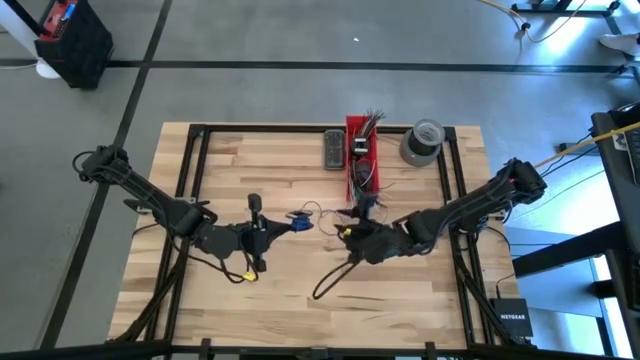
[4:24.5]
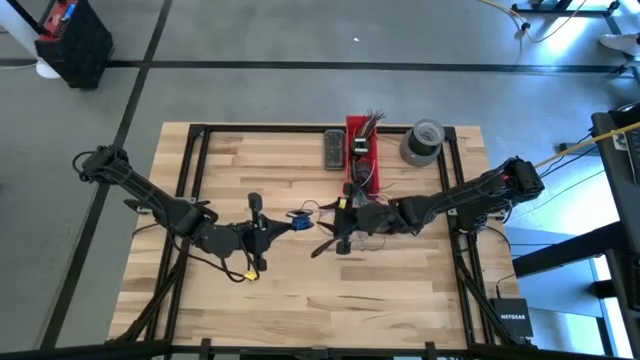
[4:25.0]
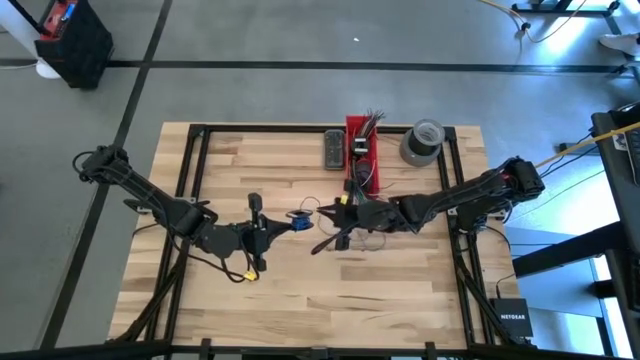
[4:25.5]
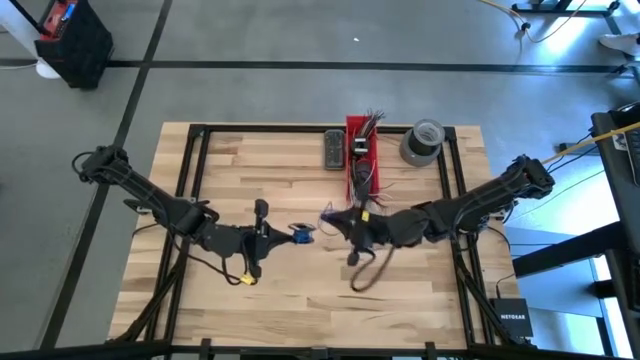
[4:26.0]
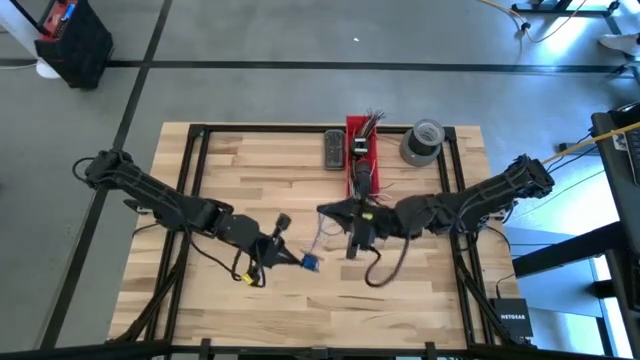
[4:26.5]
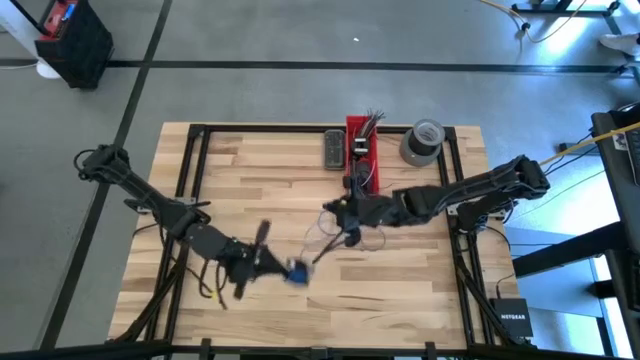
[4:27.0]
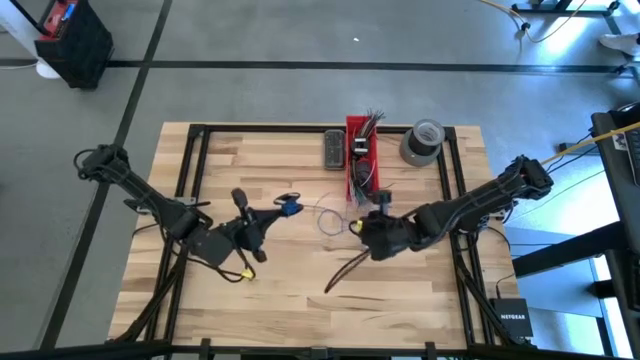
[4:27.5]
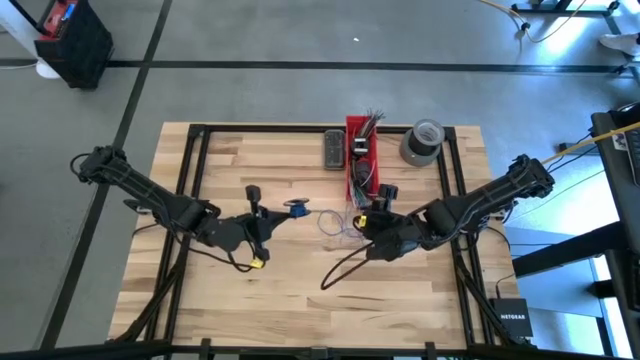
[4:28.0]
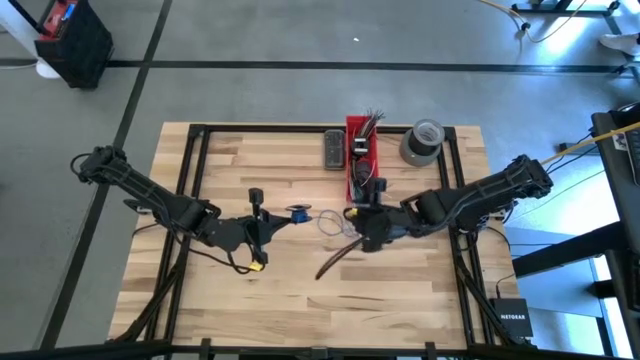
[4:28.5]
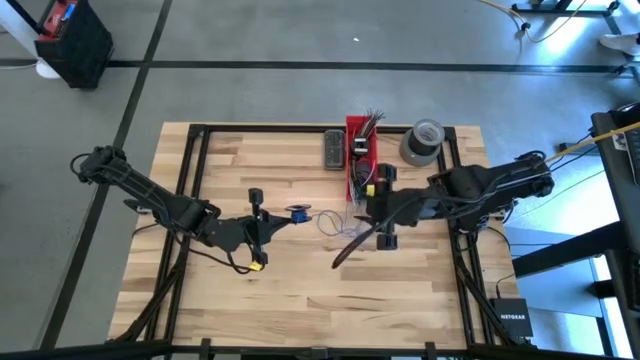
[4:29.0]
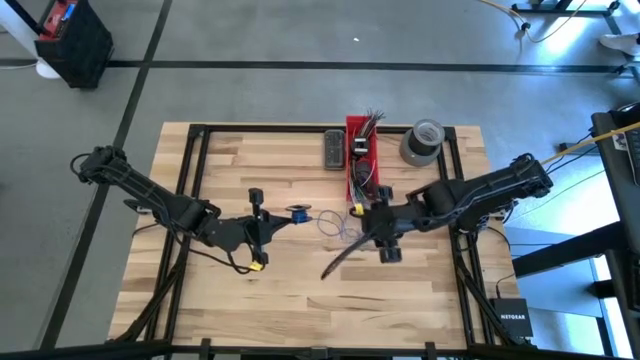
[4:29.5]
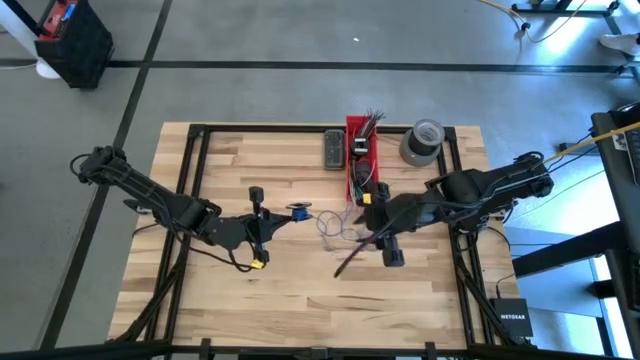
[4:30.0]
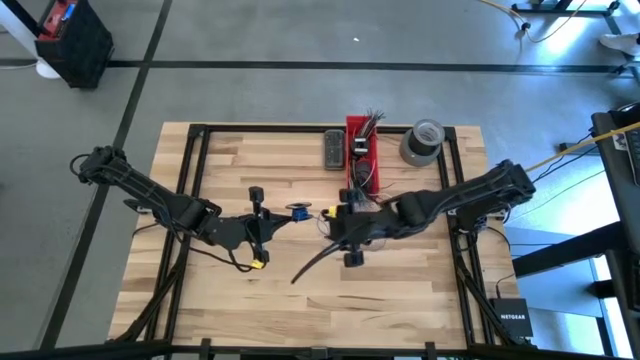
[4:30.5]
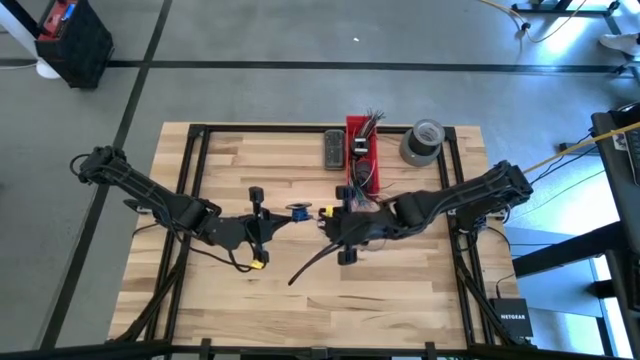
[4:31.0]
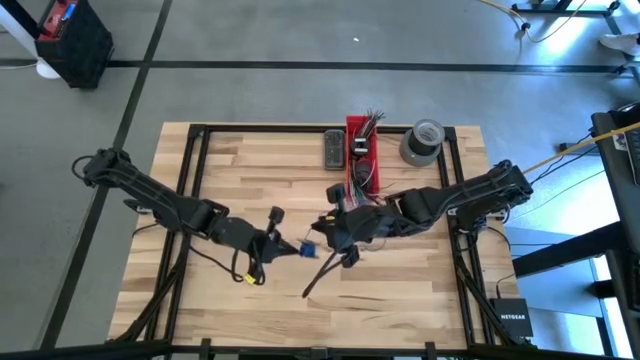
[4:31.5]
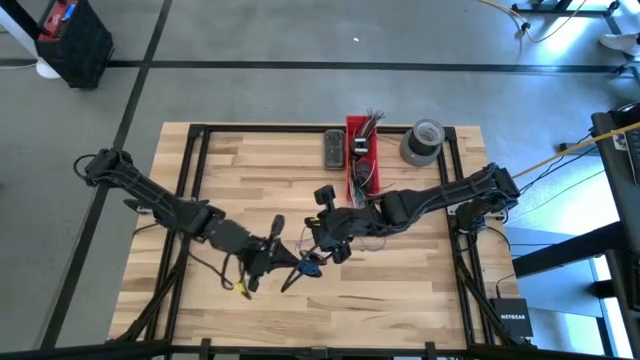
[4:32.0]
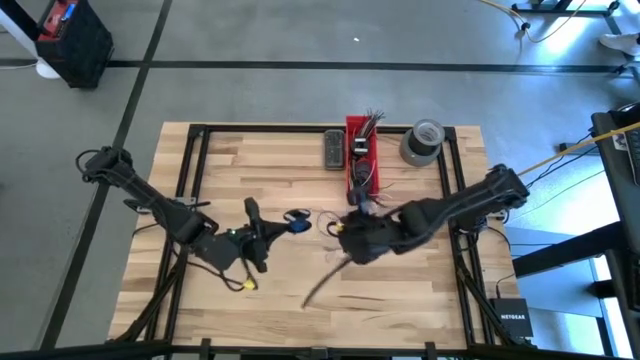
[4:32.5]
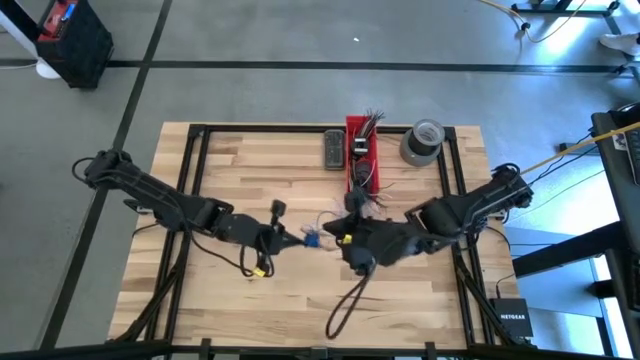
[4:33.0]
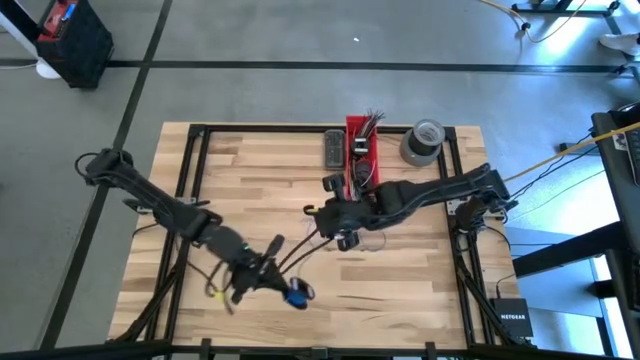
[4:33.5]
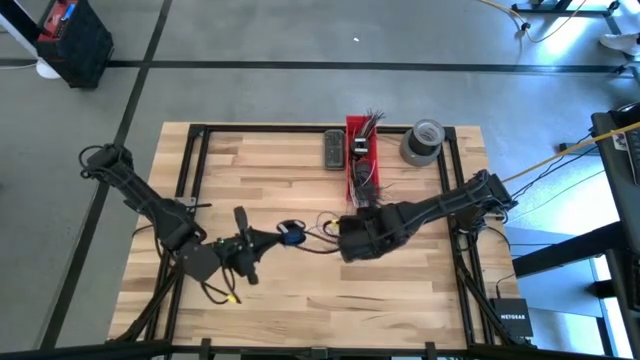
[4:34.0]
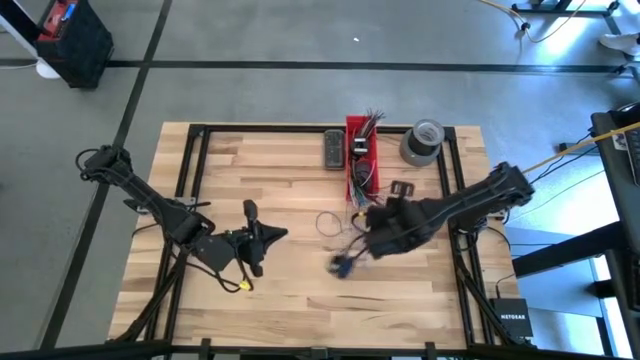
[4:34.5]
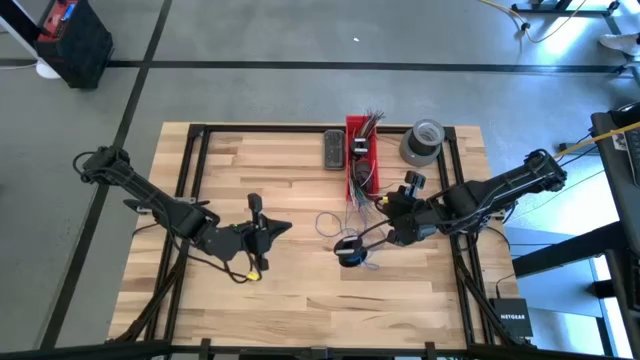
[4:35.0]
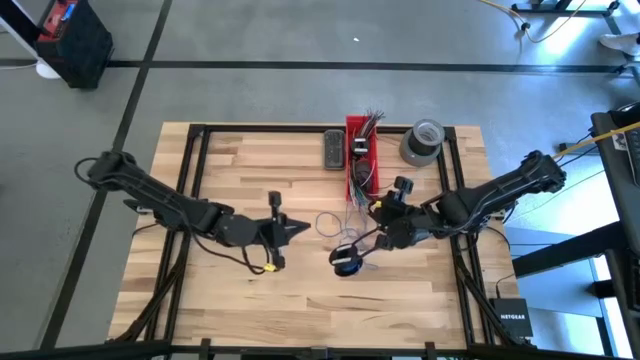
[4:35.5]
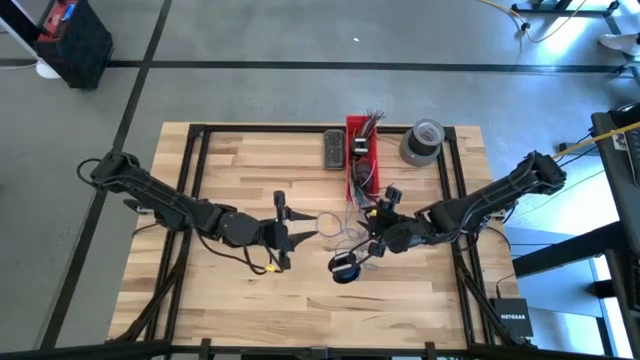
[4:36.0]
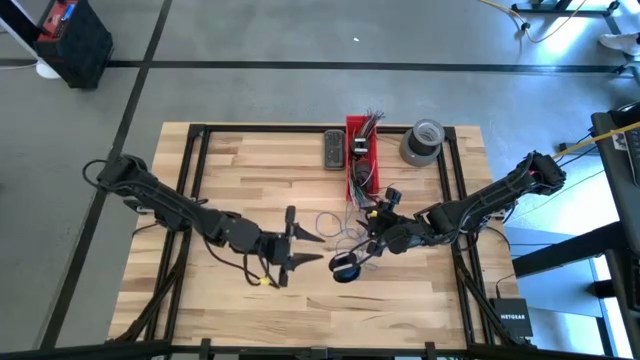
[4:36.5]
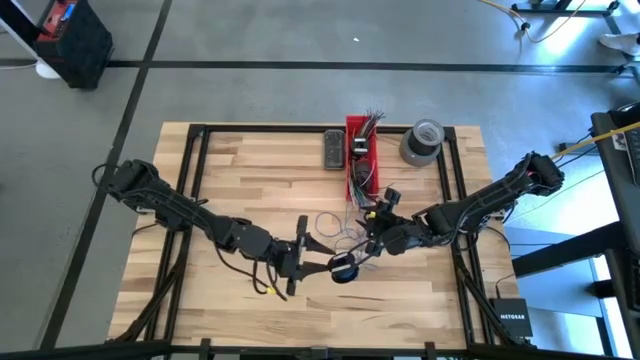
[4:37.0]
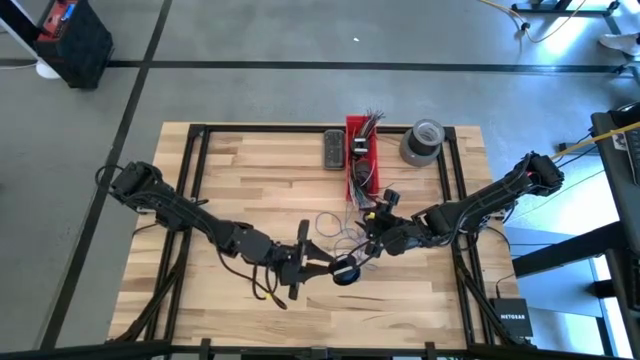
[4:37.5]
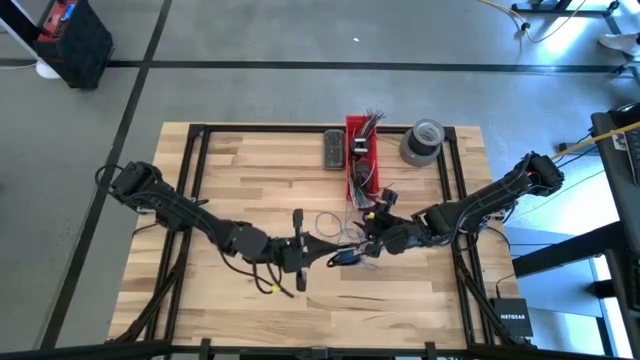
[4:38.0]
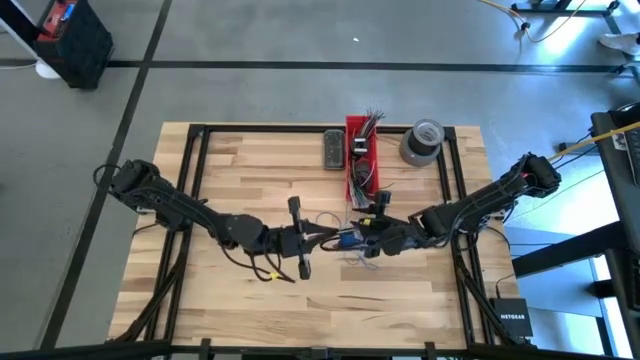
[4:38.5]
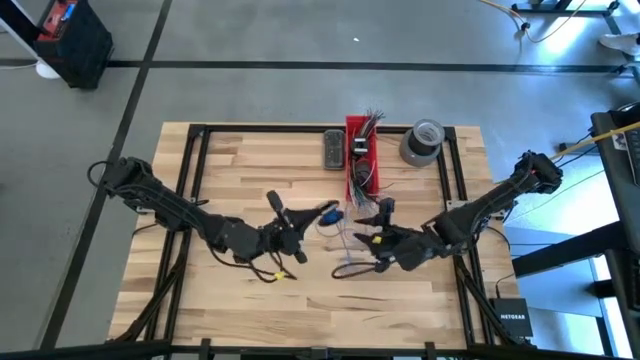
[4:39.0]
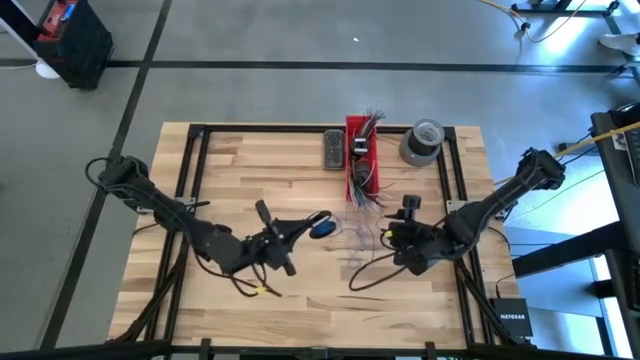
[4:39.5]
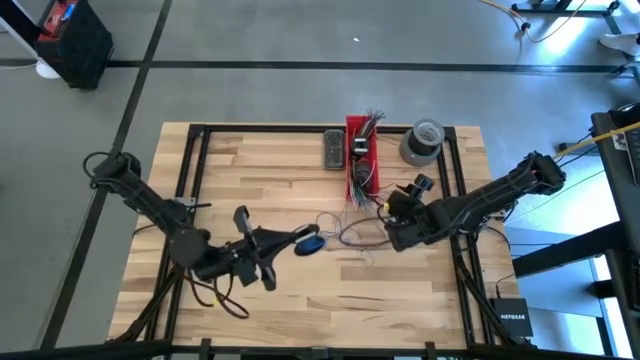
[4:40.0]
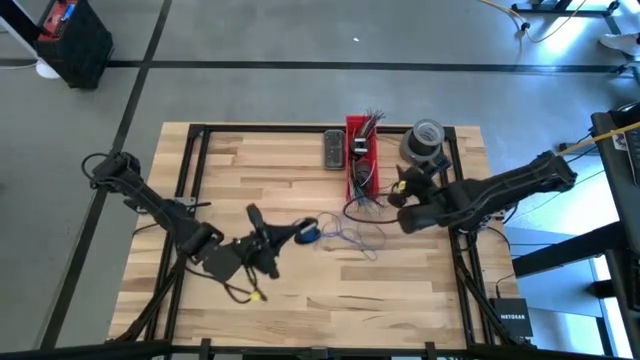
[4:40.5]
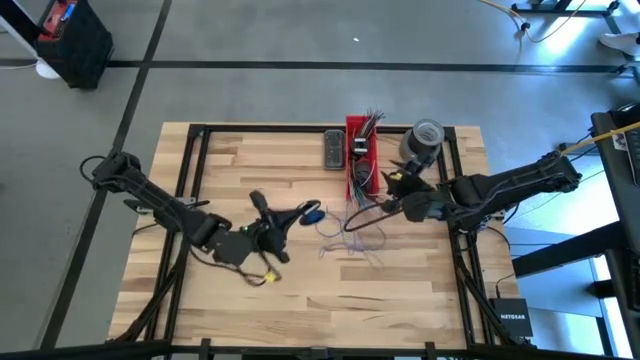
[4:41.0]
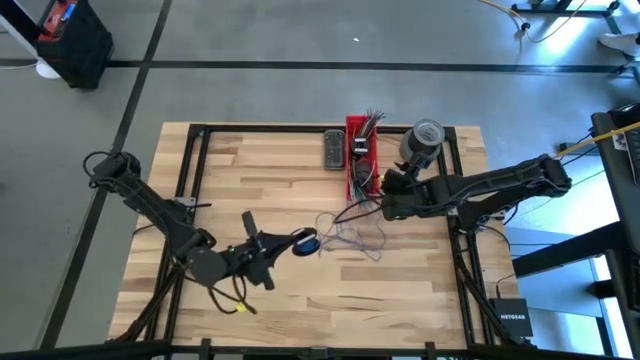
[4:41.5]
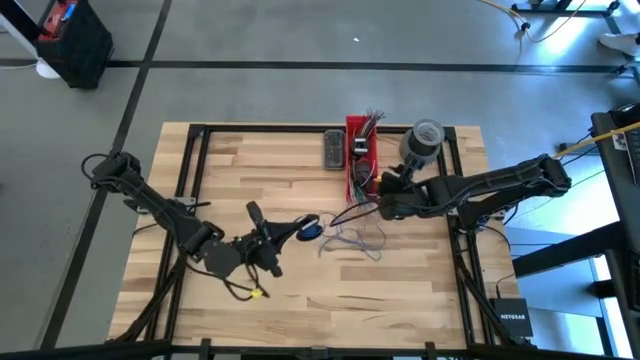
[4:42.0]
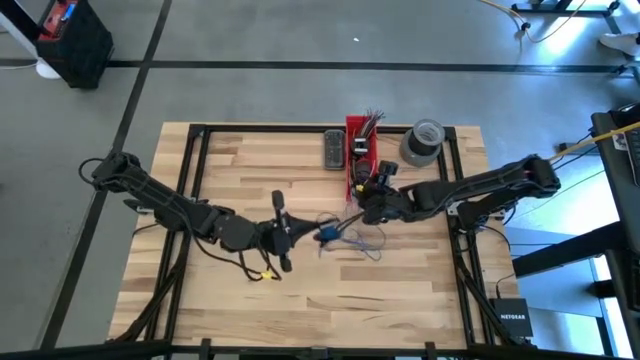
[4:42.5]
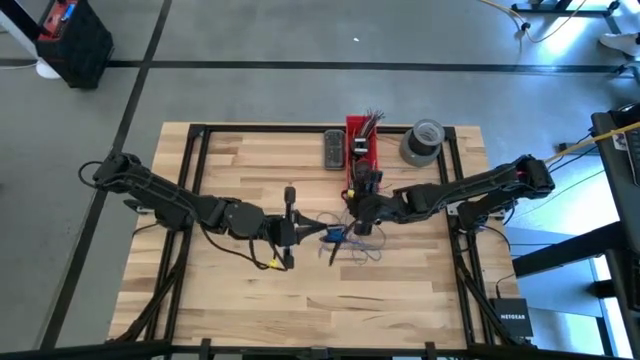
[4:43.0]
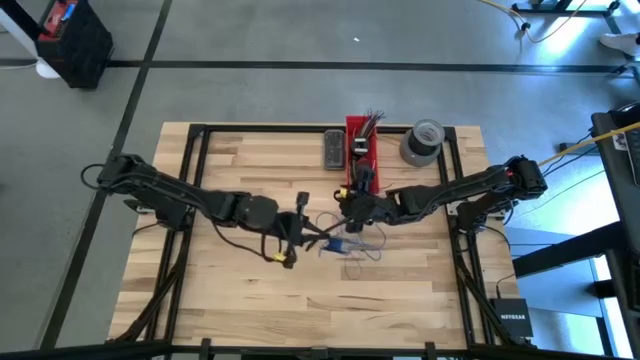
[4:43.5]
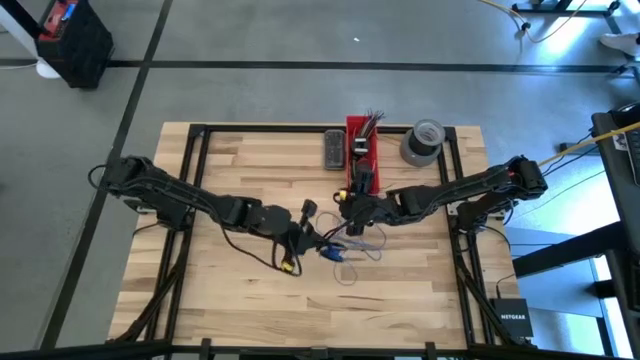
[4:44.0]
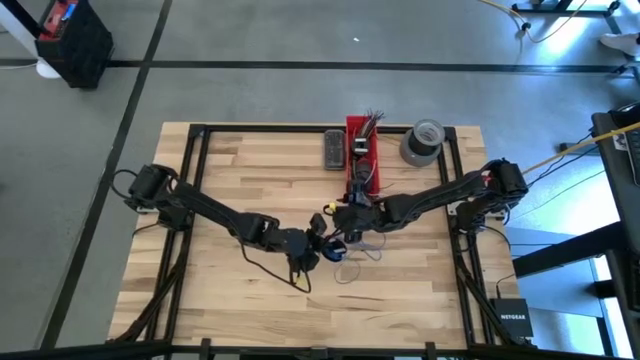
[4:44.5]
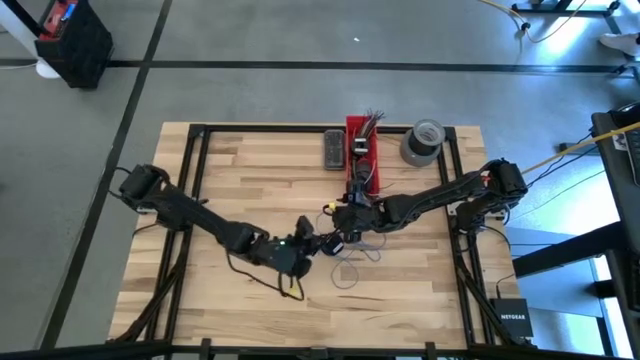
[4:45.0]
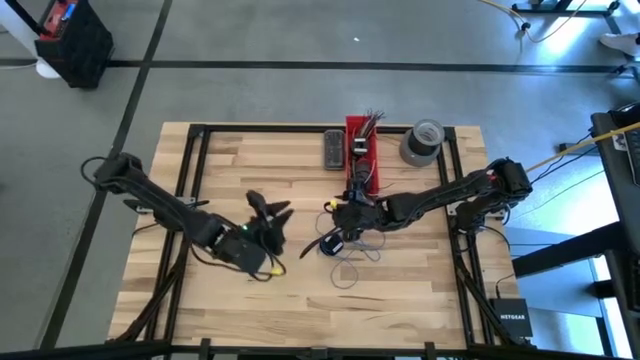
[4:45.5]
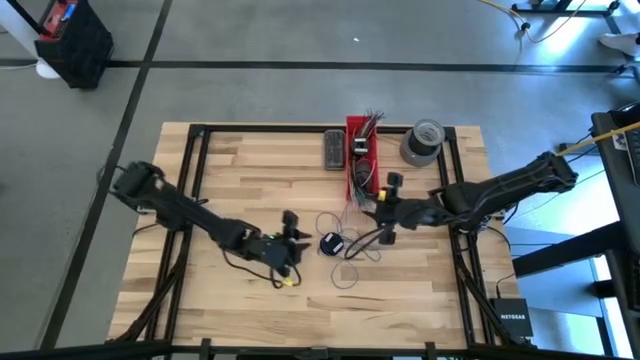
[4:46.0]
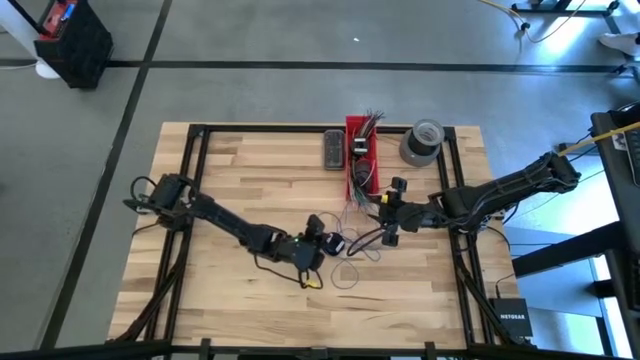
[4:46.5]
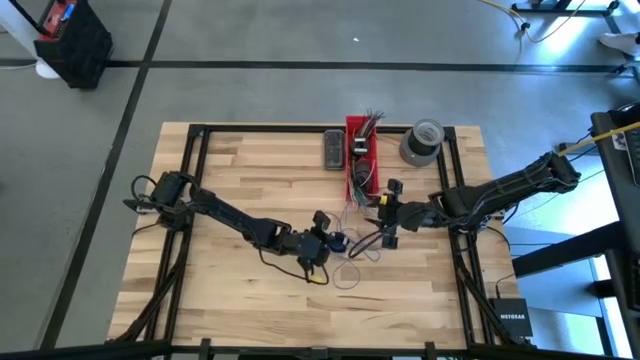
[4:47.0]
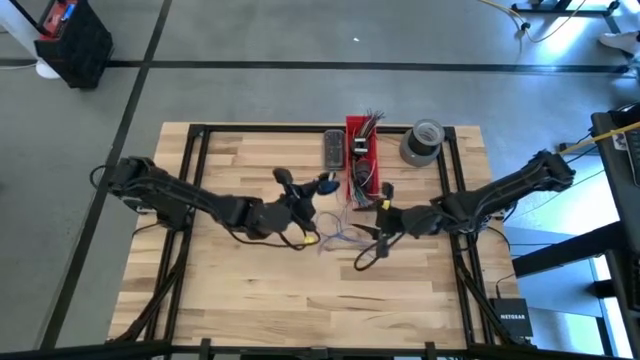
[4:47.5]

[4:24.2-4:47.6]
Task: Coil cords
Uncoil the blue wire from the black spool
